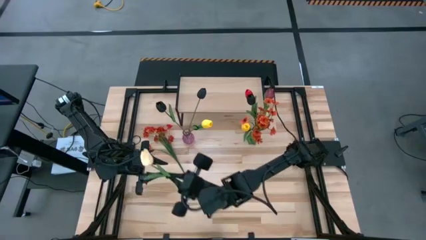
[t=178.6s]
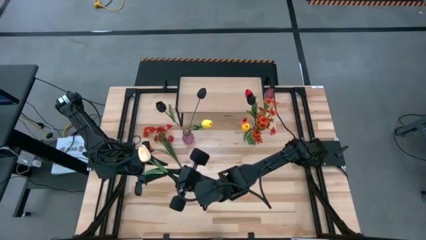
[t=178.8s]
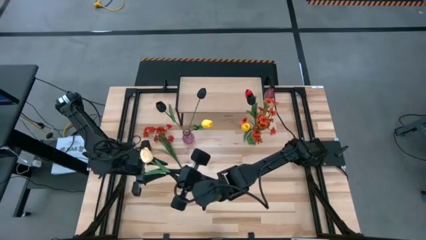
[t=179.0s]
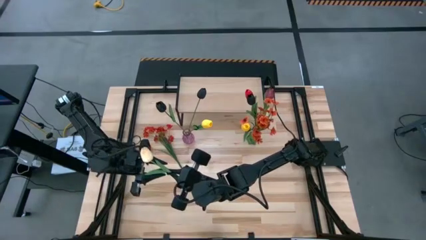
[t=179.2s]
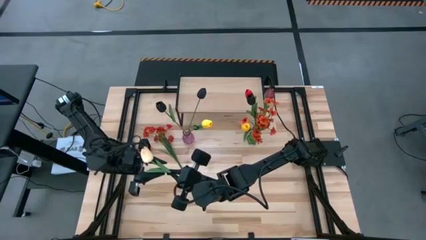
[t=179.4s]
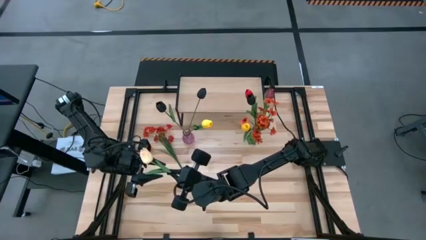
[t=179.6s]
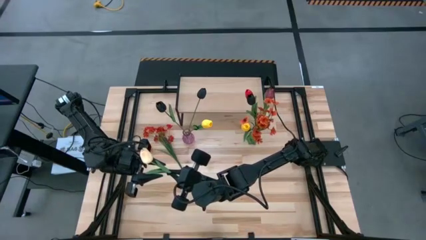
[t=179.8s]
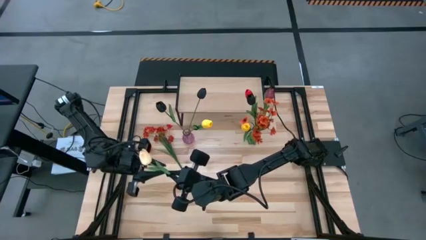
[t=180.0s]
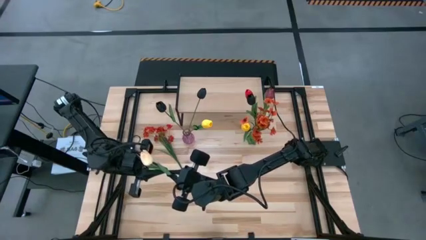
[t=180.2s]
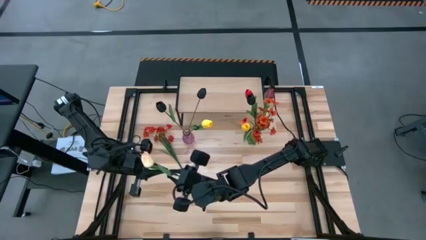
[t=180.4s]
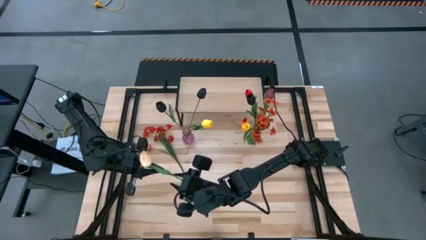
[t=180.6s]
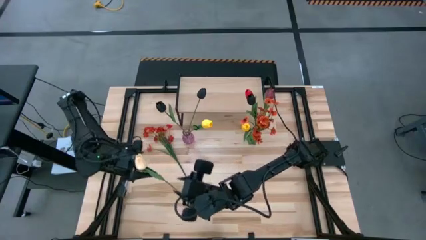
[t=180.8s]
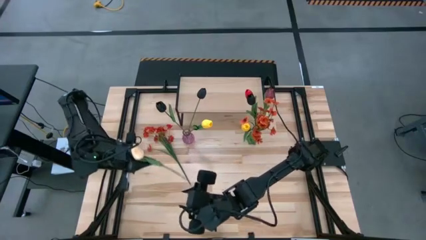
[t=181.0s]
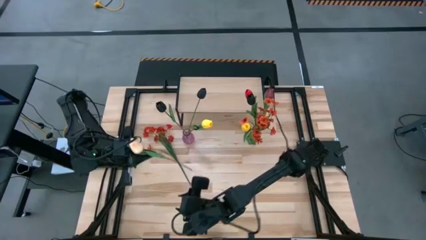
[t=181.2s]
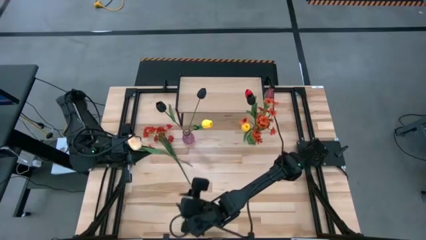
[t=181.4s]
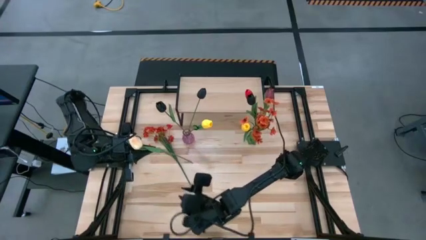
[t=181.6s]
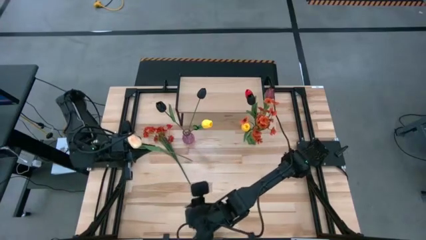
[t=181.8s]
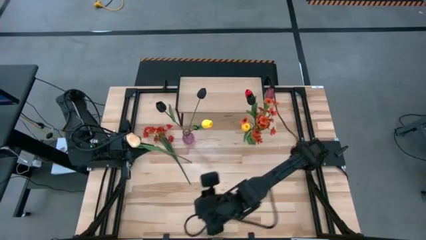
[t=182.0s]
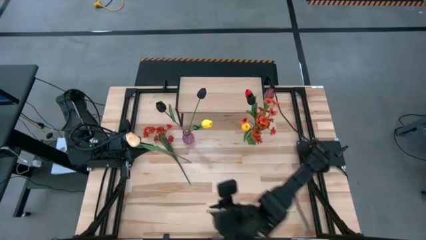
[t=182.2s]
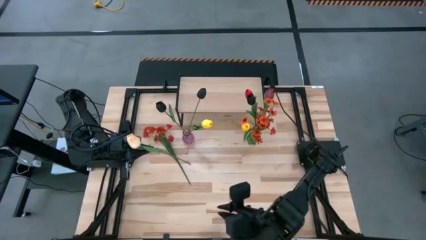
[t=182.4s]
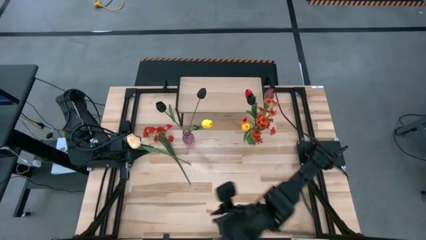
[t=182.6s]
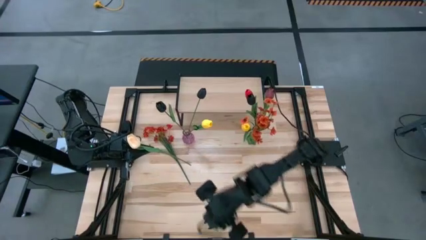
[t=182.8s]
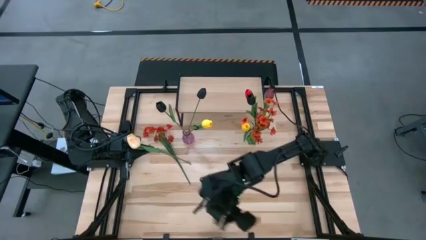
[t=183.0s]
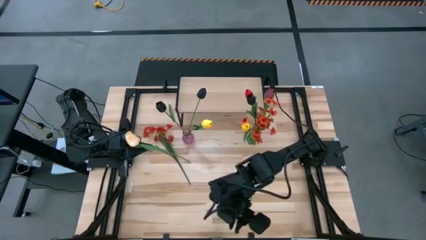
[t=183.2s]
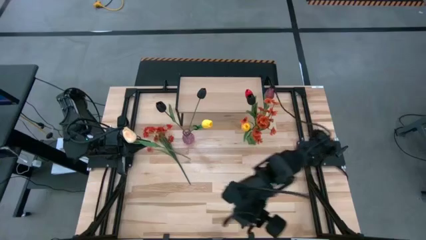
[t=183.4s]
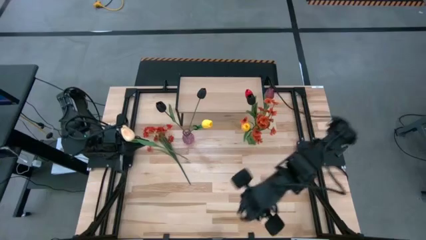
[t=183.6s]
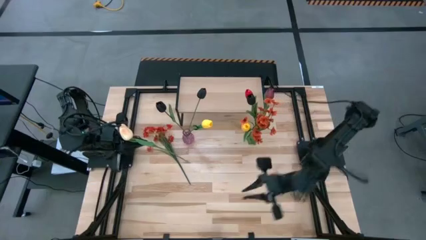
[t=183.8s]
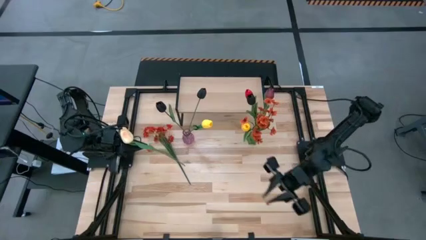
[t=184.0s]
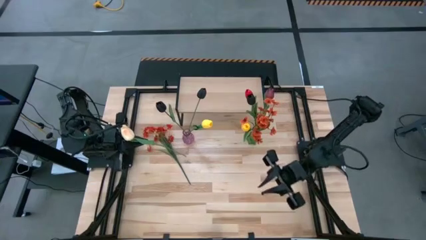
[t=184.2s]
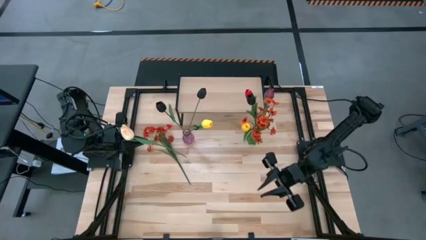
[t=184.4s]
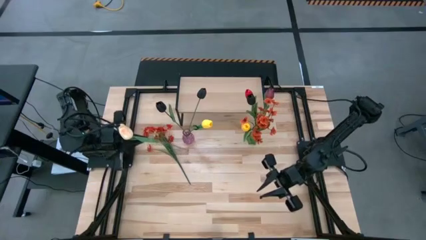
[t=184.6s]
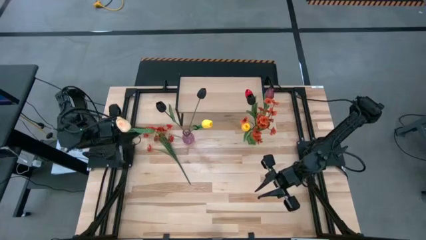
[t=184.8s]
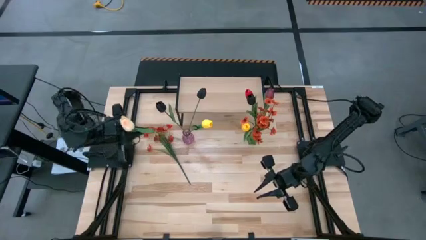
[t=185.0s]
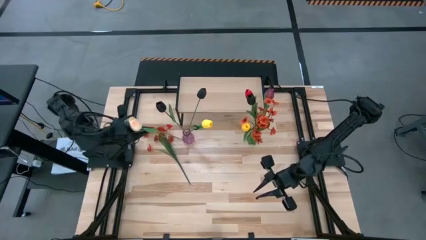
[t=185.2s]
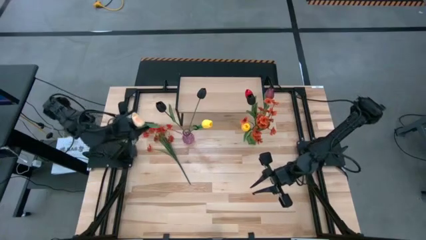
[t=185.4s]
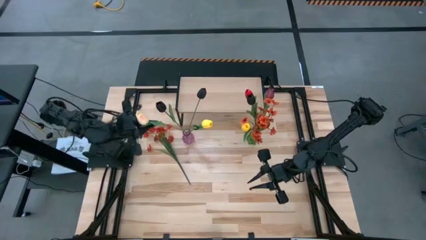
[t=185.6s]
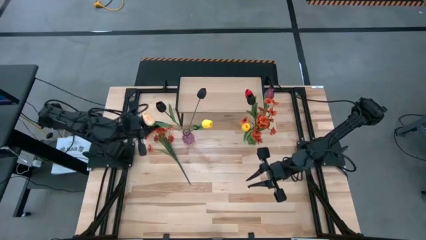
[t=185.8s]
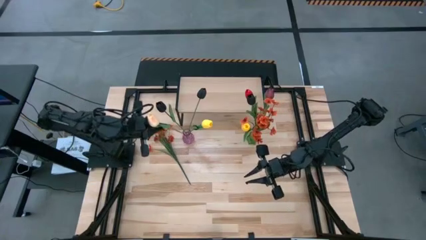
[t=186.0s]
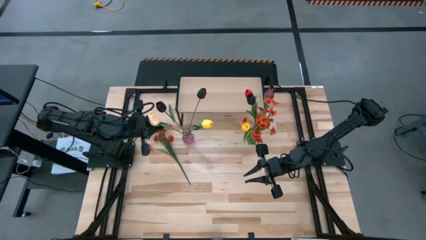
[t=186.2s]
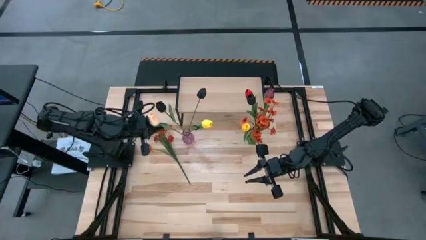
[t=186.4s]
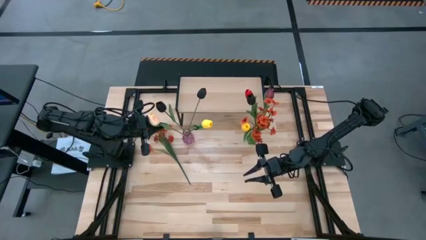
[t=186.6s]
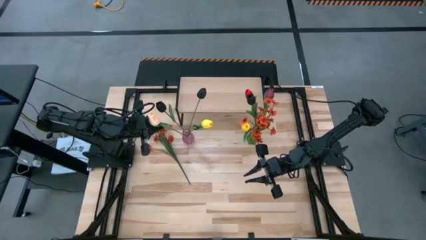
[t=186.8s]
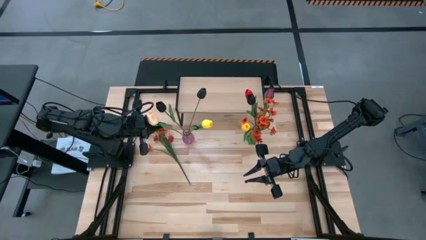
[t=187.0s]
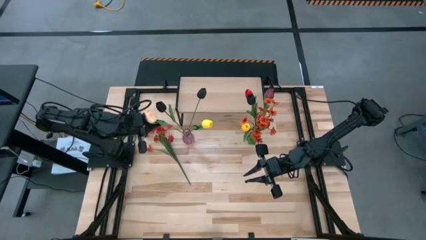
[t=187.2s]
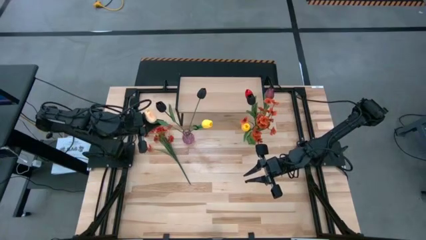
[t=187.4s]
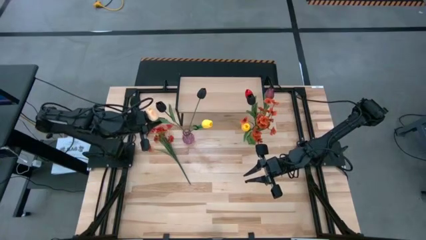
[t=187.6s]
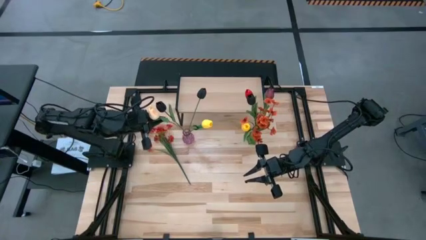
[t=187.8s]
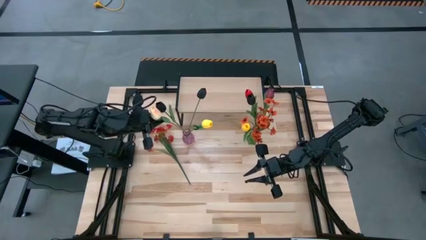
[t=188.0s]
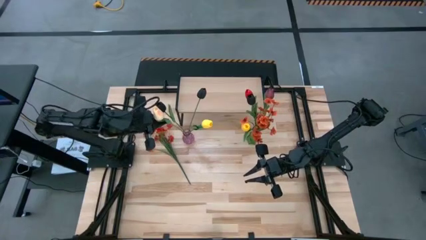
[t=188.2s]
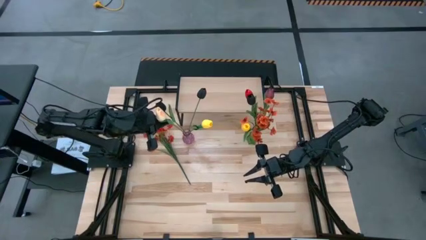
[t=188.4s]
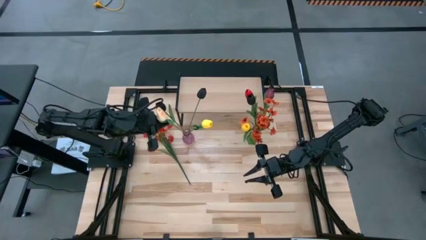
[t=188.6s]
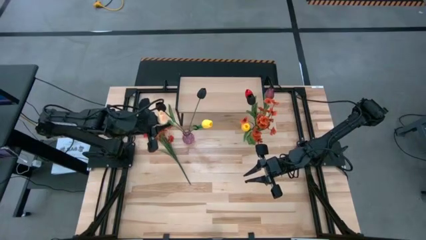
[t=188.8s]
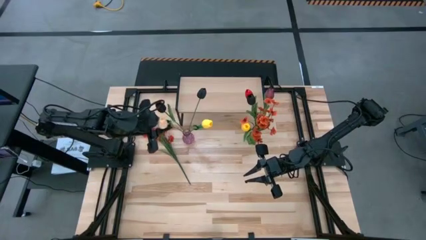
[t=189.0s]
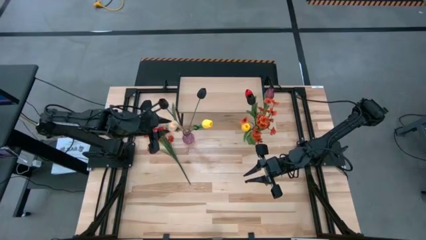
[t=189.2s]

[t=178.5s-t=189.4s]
Task: Pick and place flowers into a vace then onto a shelf
Put the light orange tulip into the purple vase

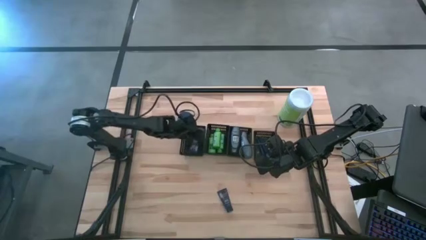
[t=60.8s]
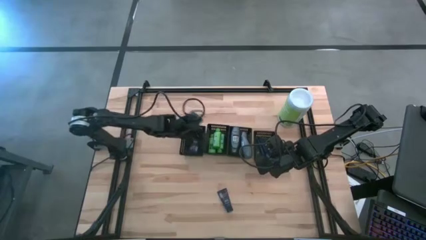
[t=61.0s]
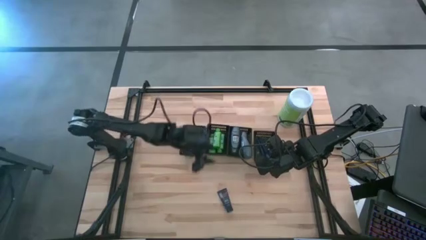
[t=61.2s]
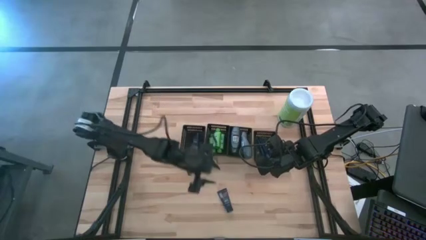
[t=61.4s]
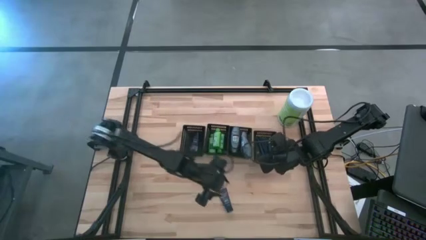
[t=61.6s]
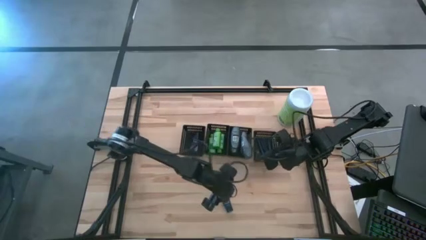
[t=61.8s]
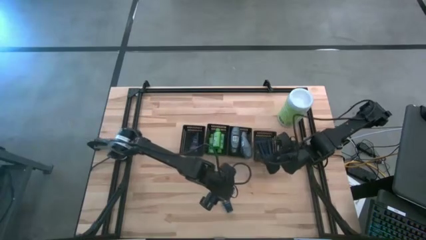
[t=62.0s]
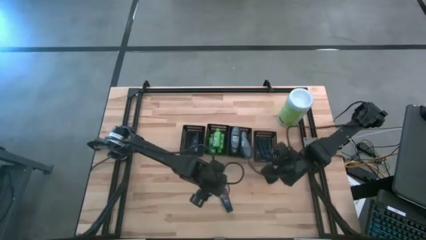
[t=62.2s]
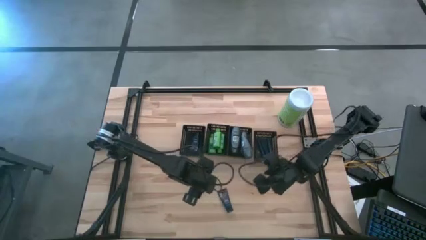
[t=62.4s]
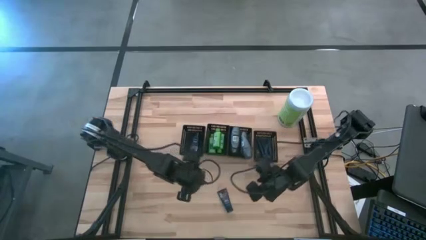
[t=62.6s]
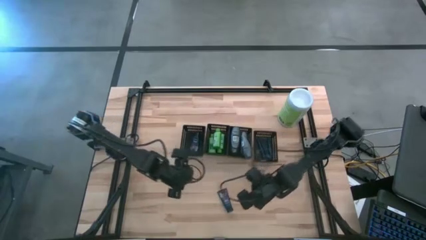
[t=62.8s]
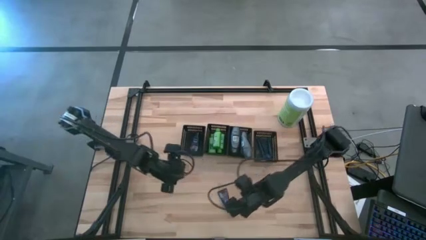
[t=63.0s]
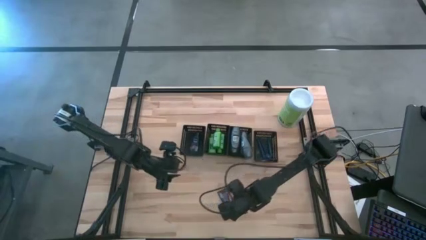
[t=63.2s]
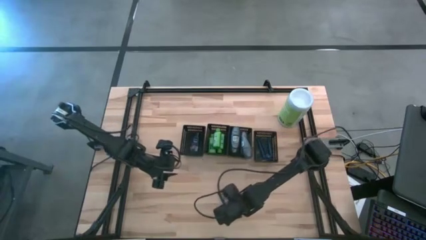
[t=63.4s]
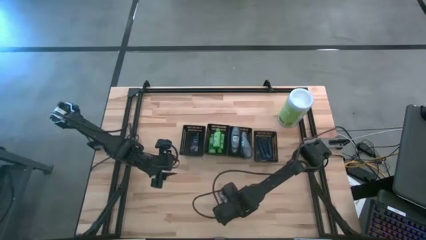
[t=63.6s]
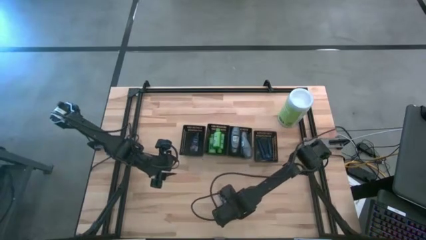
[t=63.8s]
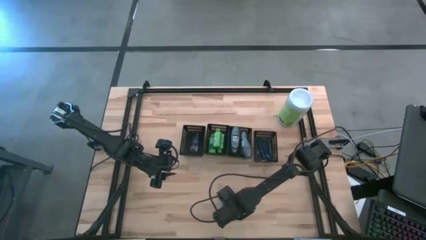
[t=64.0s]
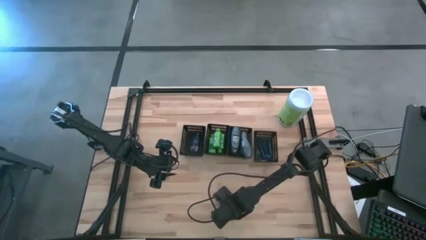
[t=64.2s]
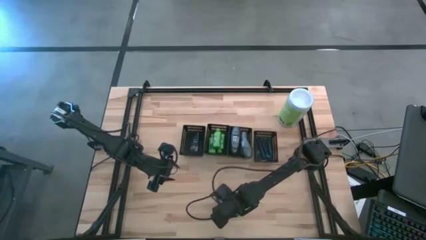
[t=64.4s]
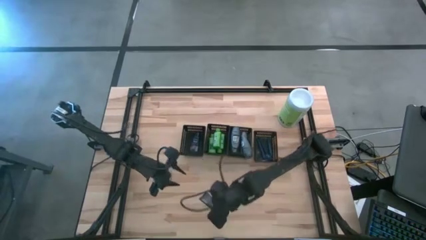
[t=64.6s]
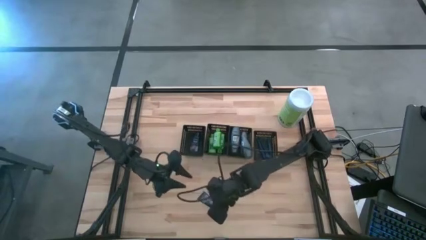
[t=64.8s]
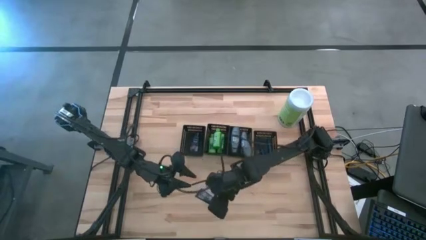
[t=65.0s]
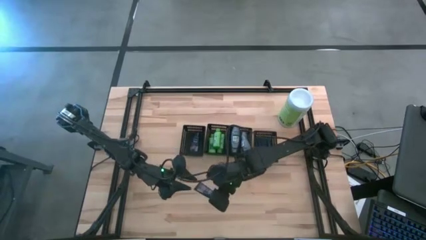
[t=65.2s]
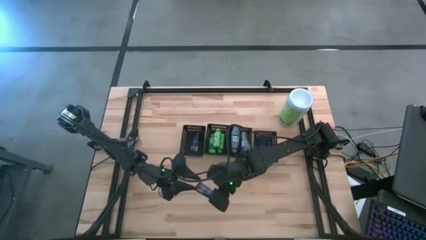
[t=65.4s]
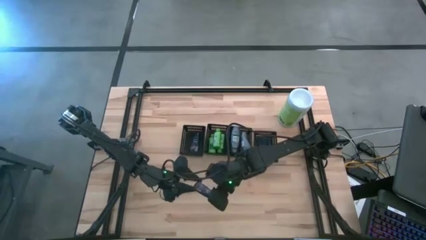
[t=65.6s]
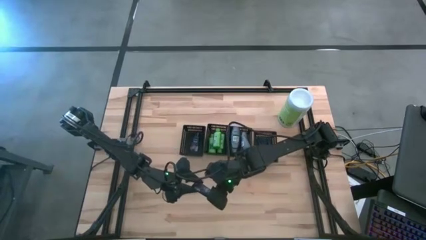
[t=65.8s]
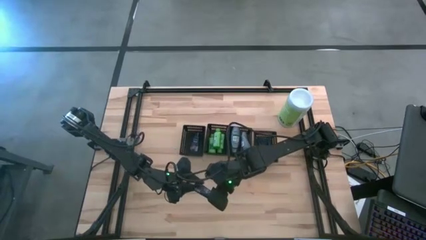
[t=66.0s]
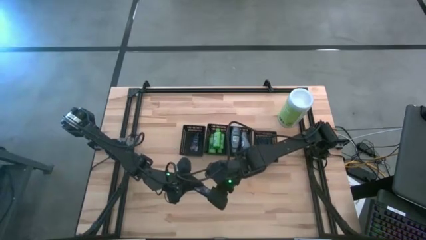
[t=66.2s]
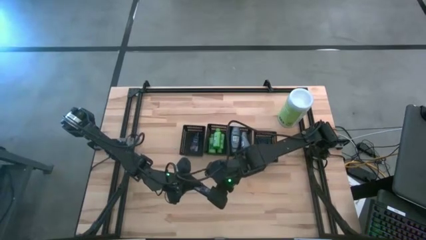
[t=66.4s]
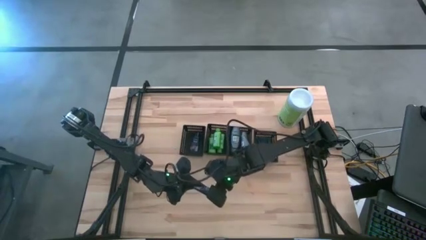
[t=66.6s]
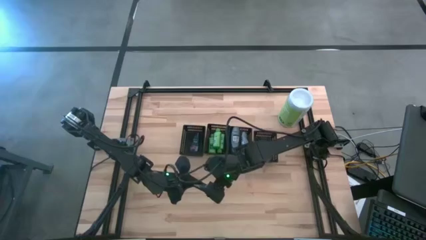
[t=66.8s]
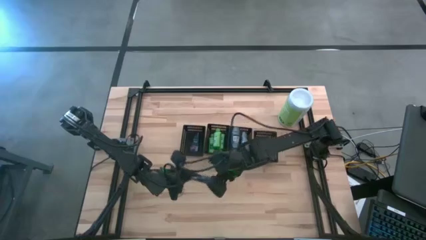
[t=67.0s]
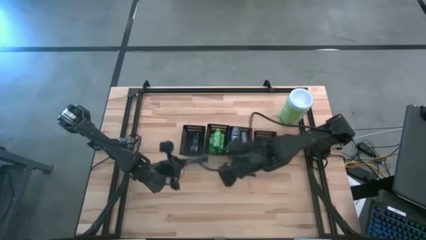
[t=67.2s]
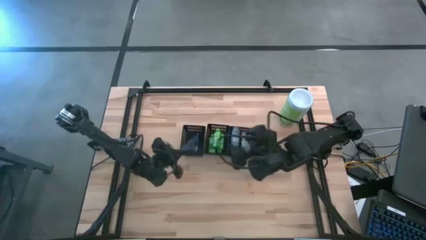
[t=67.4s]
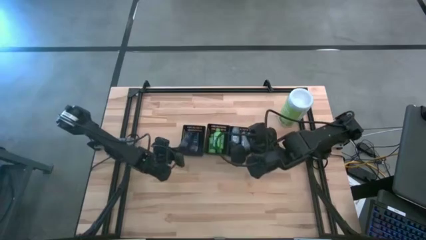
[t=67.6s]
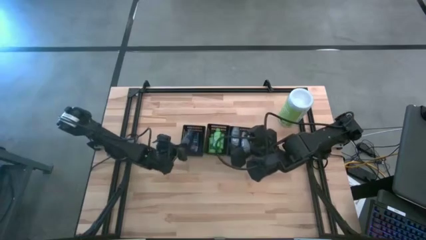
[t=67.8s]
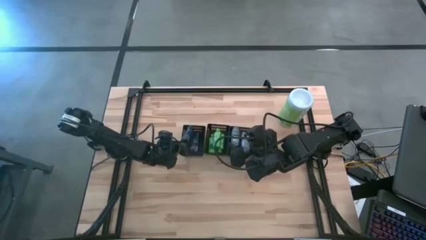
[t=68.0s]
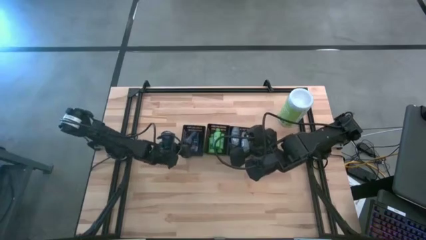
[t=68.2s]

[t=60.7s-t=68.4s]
Task: Pick & Place Travel size toiletries
Put the shaving cream into the left black bin
